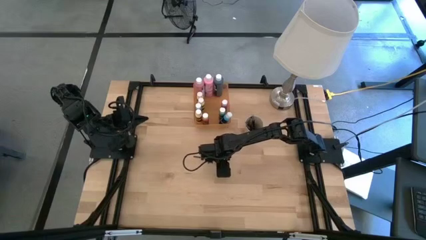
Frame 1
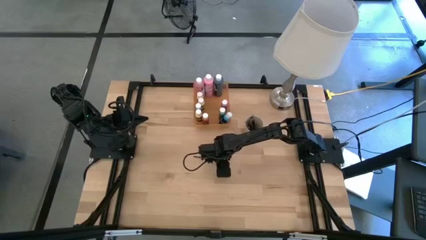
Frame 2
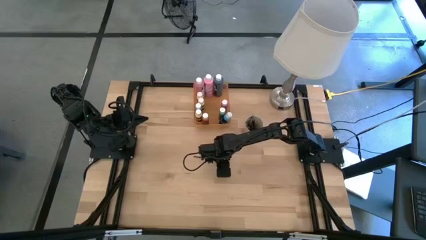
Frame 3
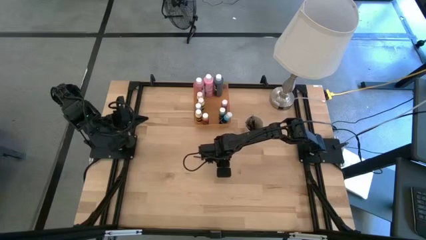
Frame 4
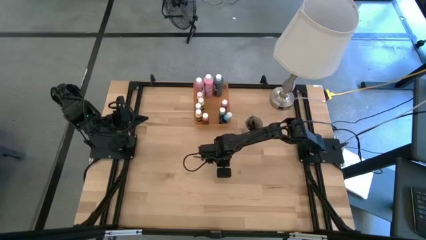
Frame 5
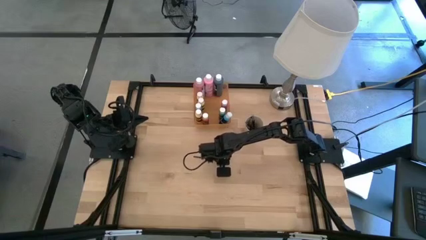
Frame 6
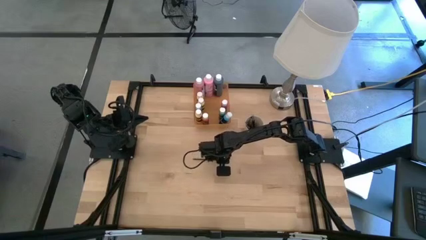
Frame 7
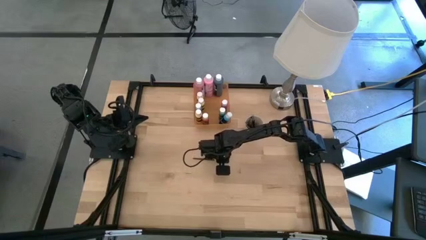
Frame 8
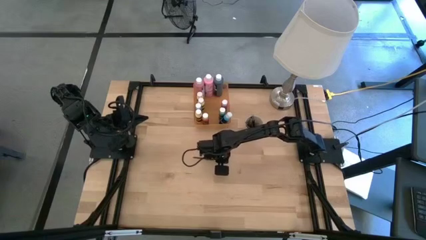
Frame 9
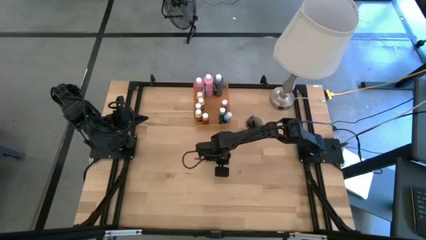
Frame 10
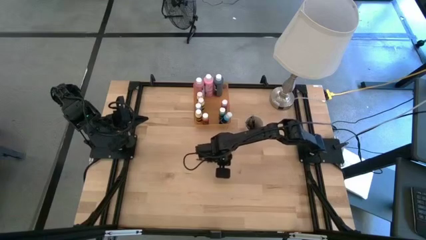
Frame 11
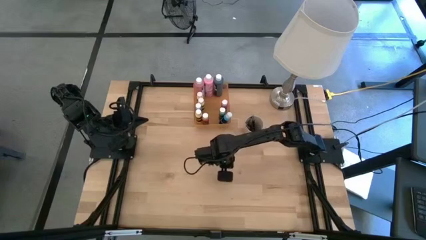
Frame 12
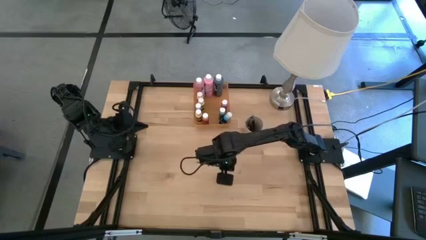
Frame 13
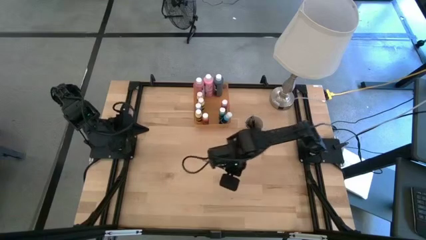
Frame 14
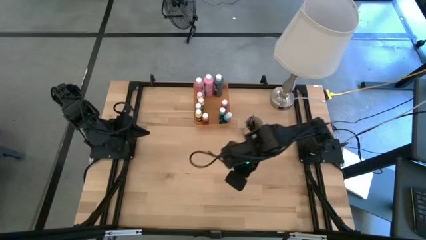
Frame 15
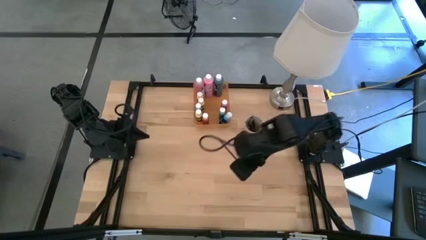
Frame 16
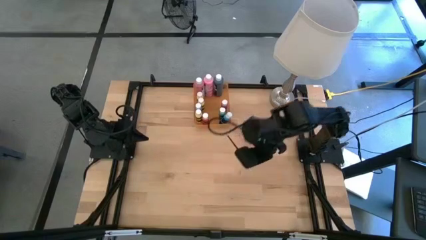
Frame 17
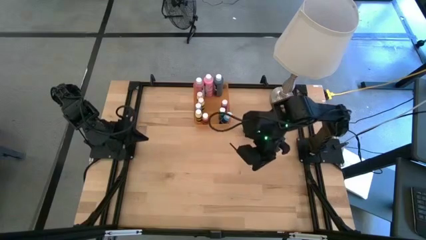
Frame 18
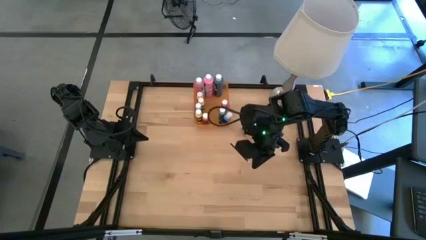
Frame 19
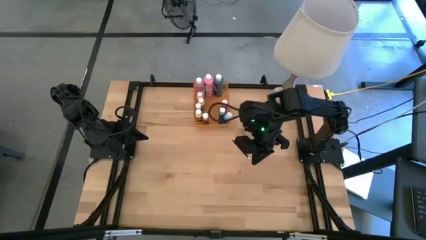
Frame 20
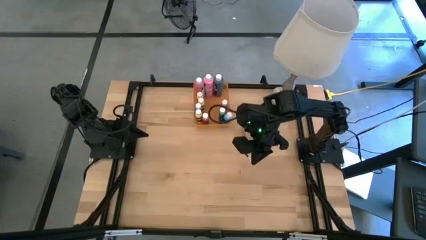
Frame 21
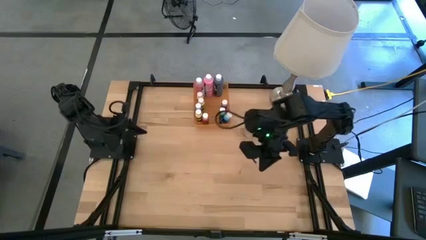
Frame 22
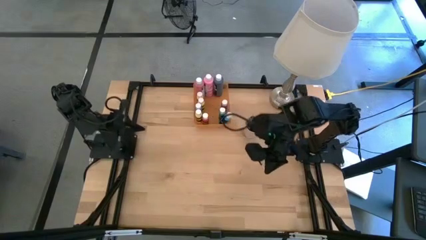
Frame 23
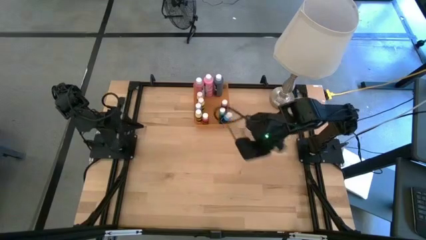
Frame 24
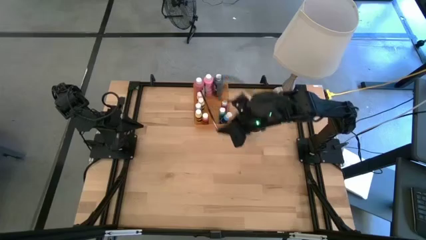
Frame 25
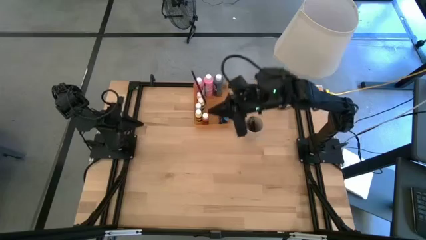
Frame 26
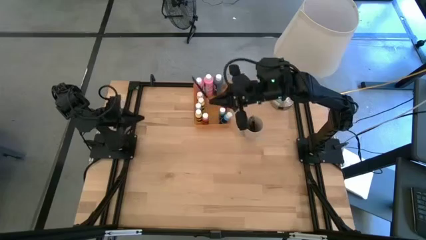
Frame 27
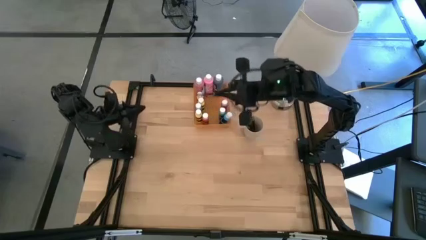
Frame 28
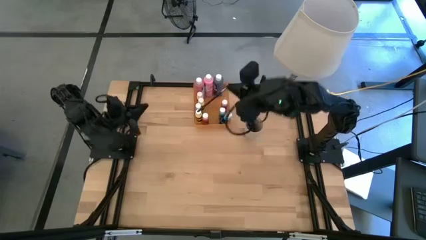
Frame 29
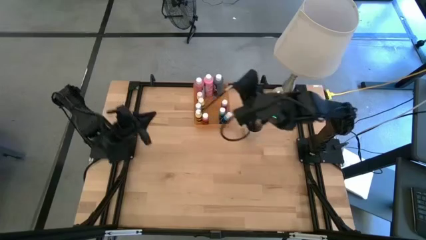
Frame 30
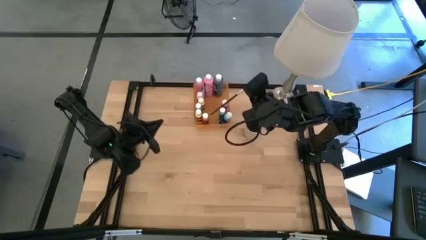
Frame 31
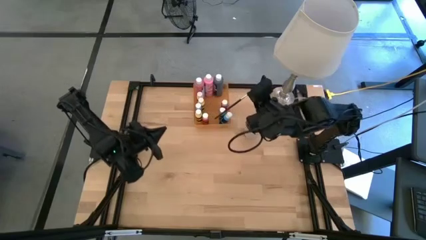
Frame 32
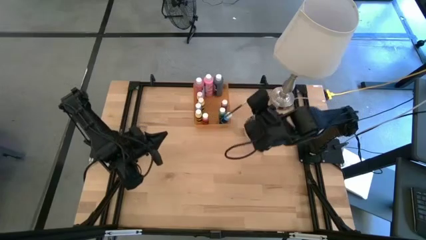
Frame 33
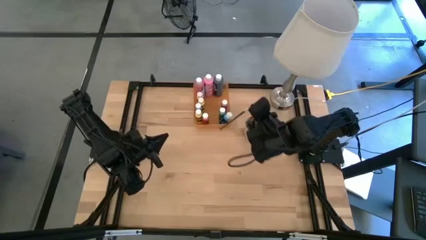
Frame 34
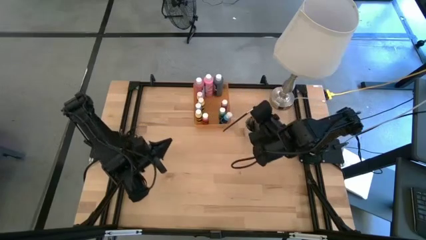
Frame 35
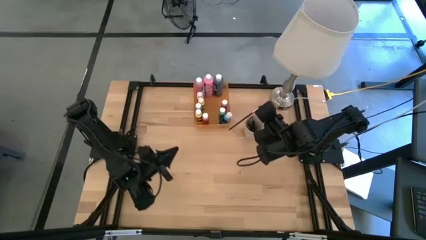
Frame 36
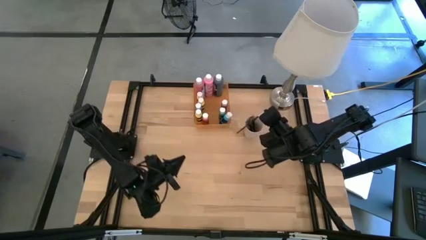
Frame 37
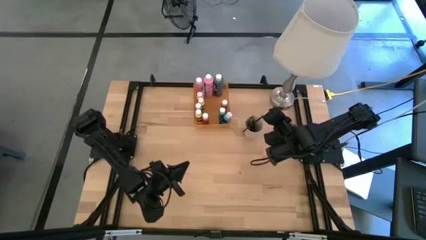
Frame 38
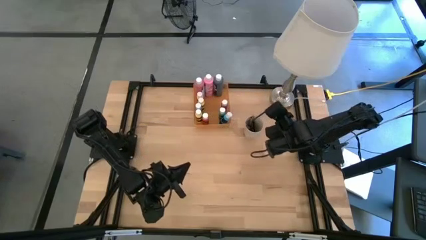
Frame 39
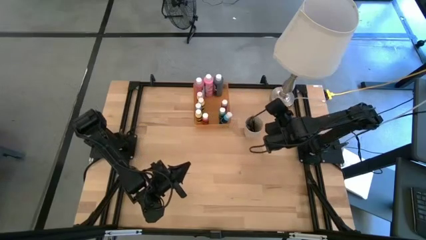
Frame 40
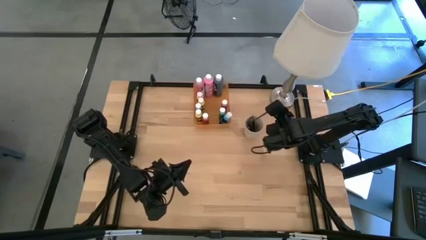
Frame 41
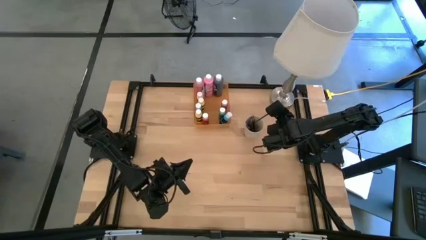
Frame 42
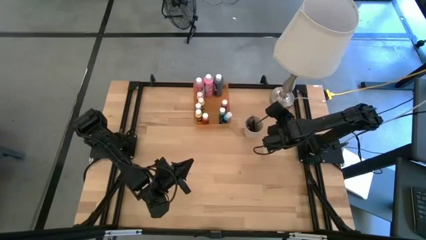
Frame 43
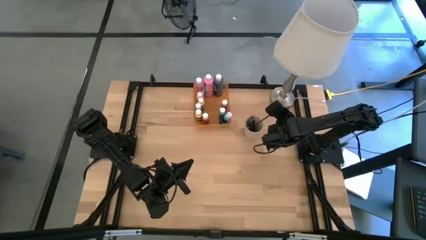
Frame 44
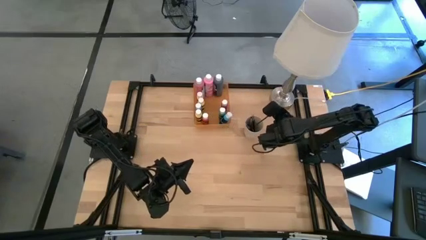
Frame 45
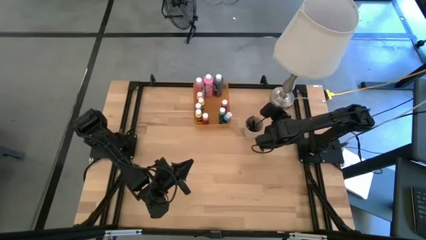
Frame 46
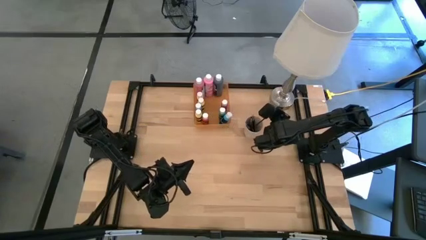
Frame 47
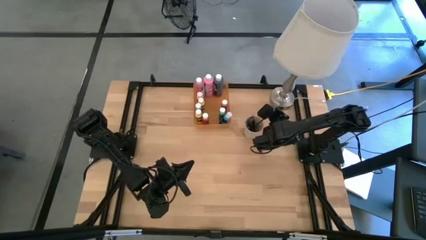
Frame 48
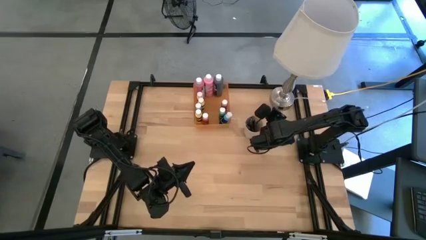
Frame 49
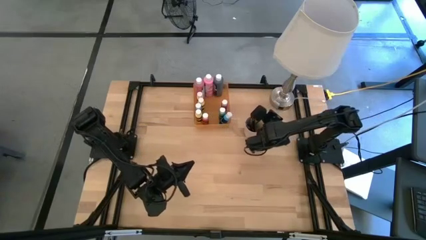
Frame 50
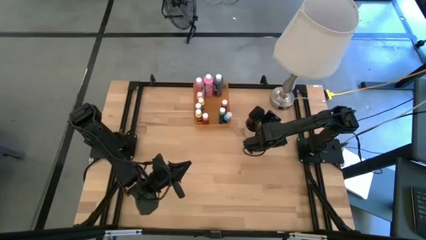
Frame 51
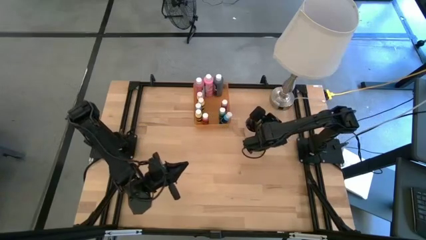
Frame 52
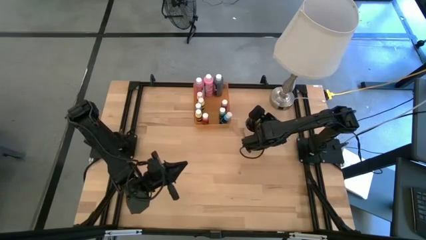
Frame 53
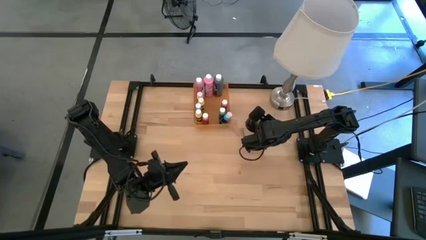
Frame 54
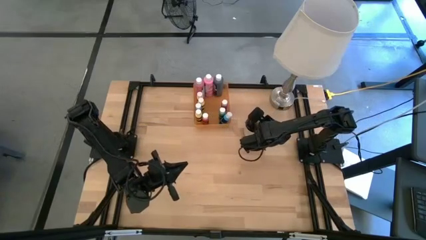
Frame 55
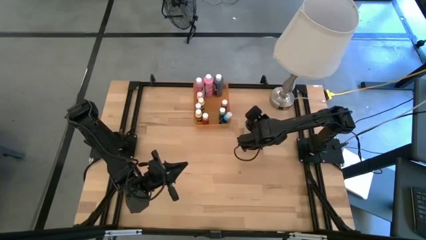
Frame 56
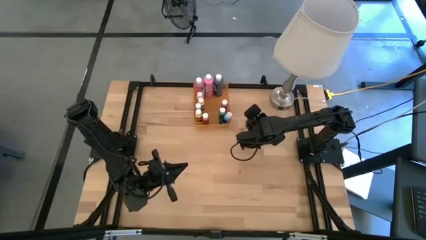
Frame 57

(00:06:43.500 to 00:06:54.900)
Task: Pick & Place Paint Supplies
Put the black paint brush into the light brown cup

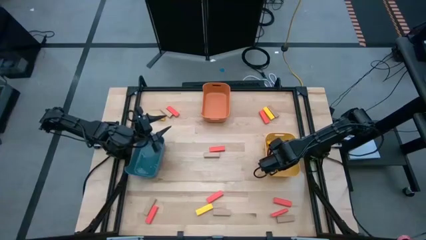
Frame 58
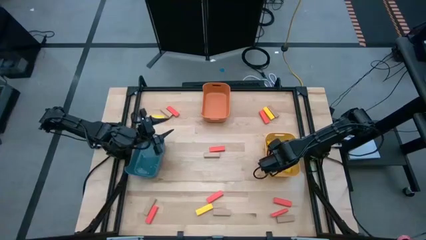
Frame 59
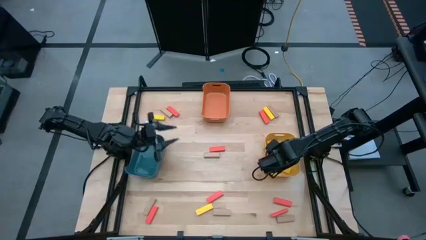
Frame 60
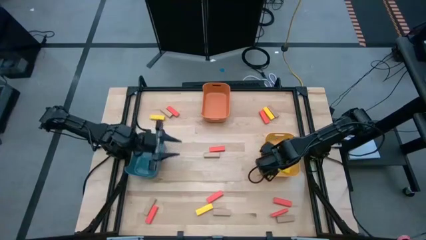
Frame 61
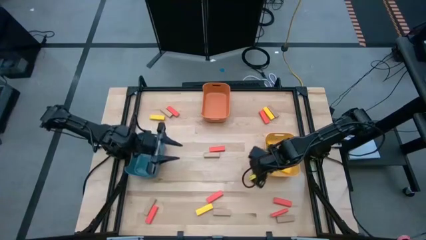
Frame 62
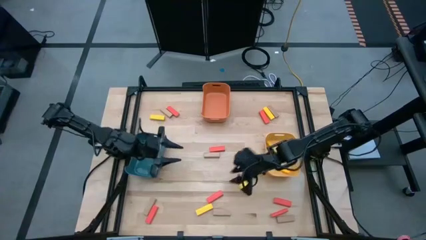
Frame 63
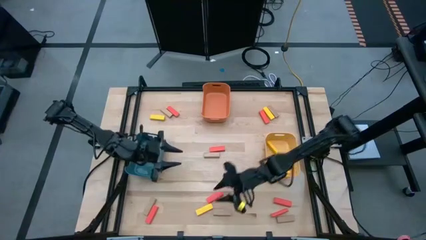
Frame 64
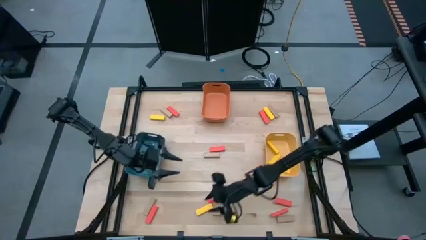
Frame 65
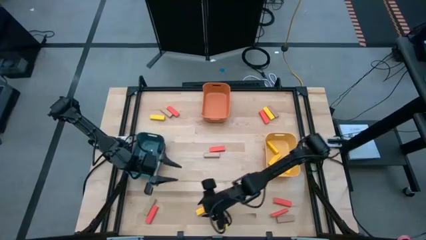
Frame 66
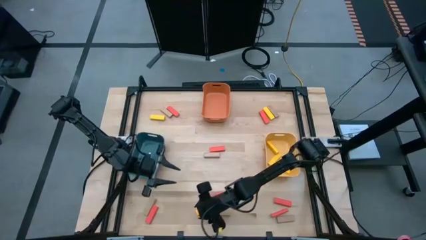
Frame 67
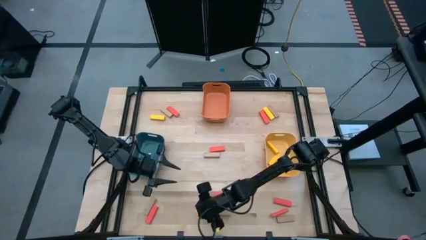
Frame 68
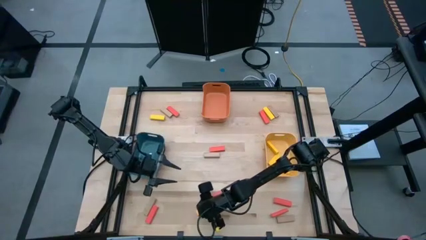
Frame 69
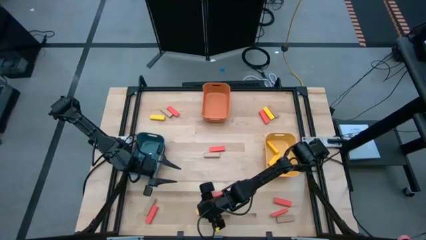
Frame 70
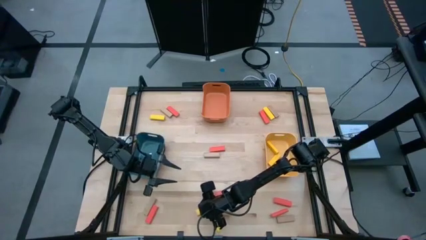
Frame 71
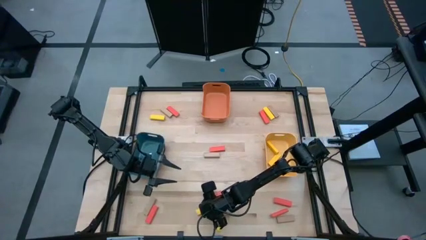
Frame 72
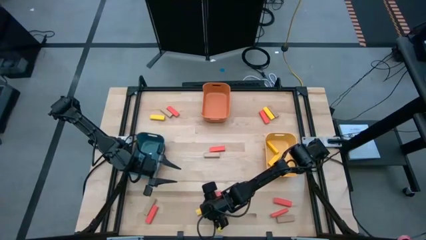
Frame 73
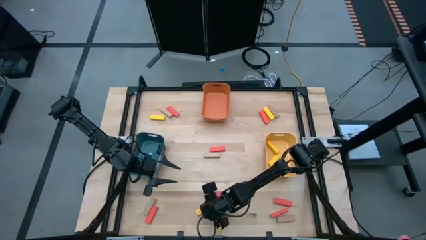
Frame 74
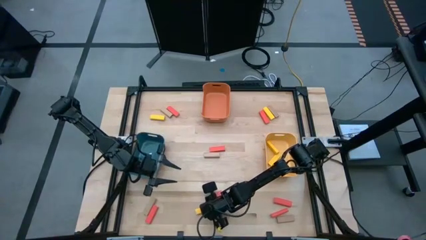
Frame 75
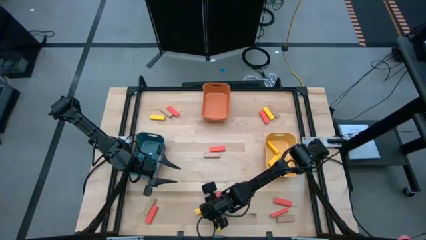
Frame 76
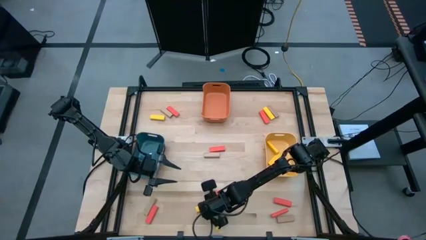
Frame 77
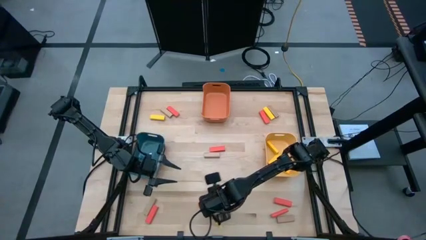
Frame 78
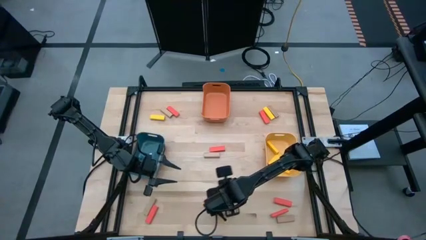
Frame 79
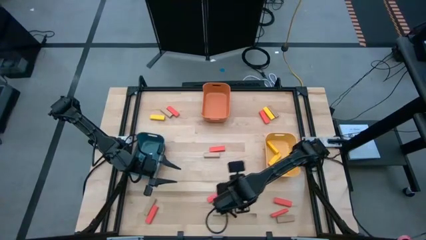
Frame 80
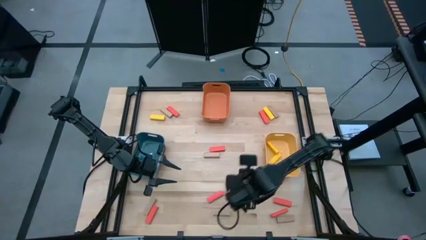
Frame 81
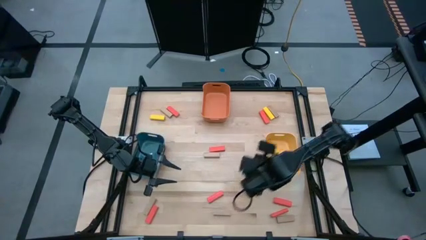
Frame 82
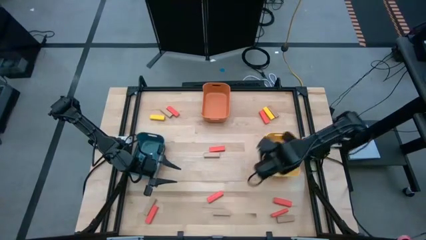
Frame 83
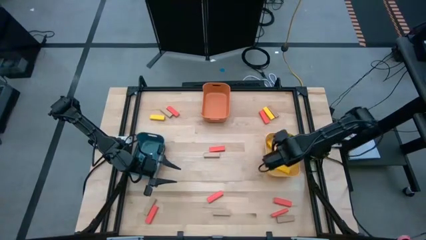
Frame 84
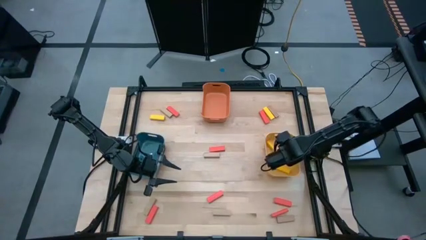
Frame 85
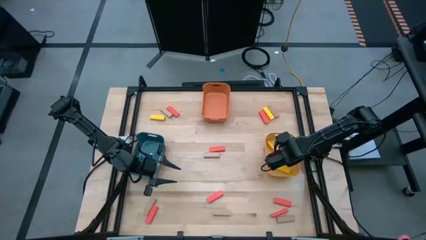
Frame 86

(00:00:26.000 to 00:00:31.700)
Task: Sort blocks
Put the bottom yellow block into the yellow bin
